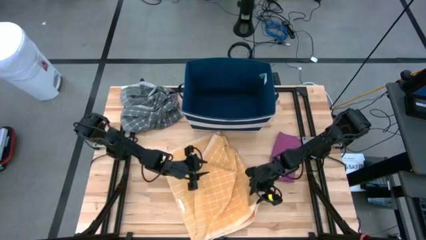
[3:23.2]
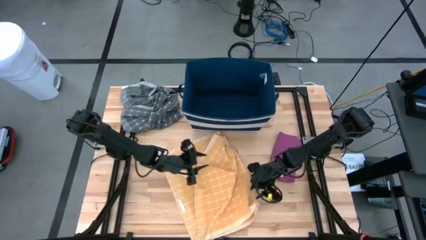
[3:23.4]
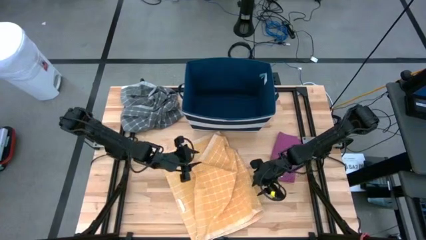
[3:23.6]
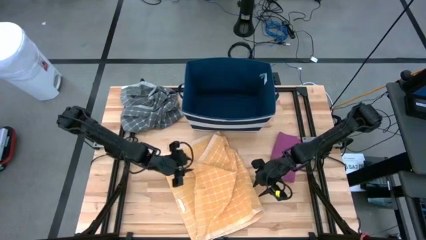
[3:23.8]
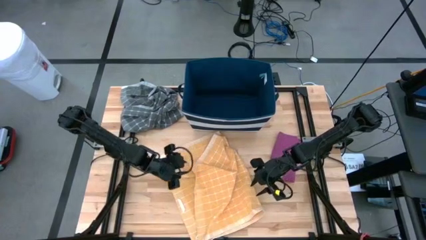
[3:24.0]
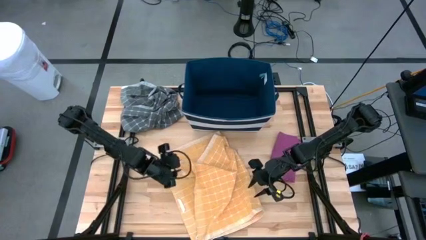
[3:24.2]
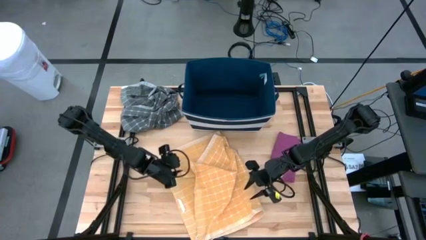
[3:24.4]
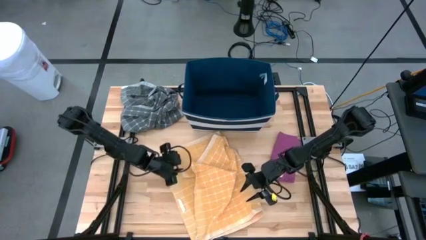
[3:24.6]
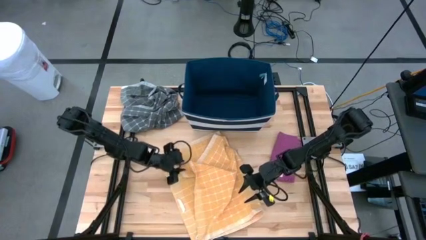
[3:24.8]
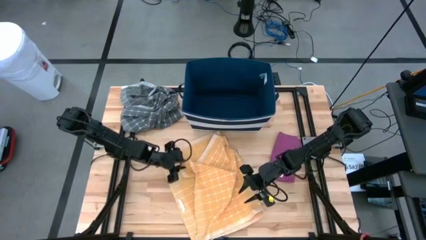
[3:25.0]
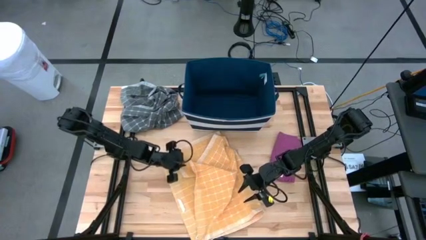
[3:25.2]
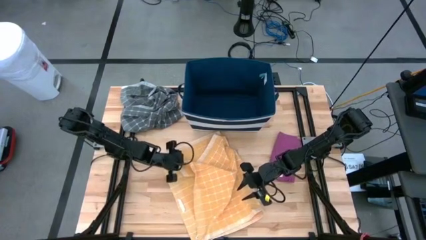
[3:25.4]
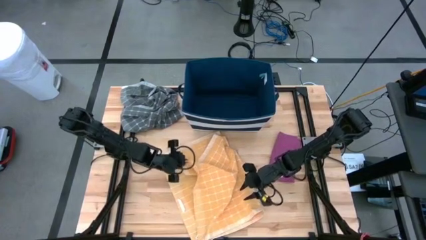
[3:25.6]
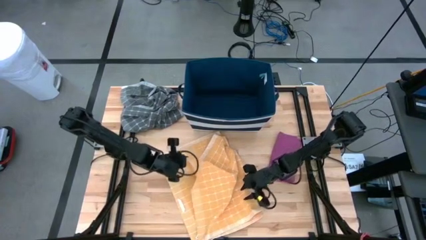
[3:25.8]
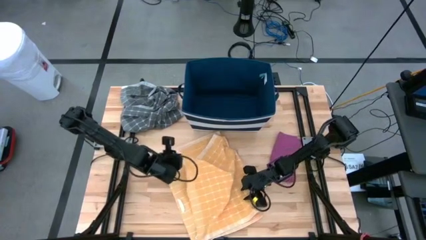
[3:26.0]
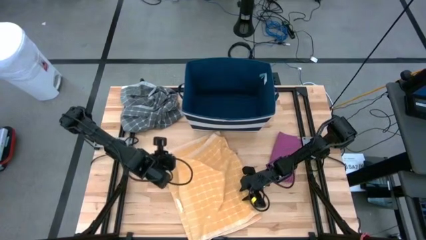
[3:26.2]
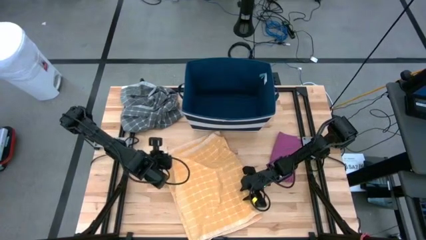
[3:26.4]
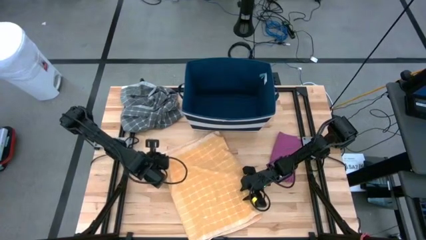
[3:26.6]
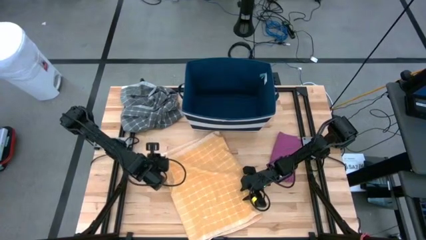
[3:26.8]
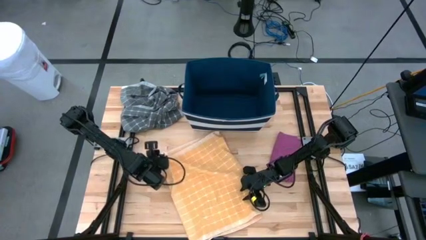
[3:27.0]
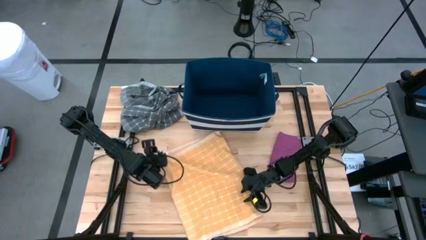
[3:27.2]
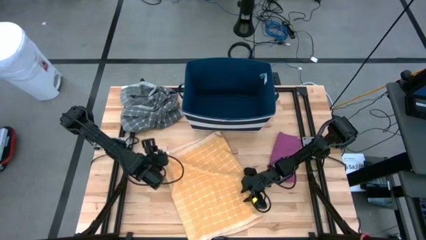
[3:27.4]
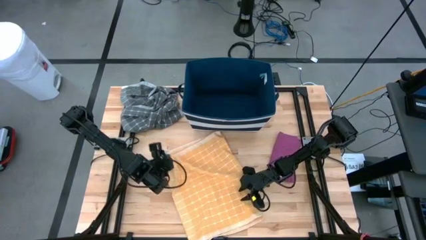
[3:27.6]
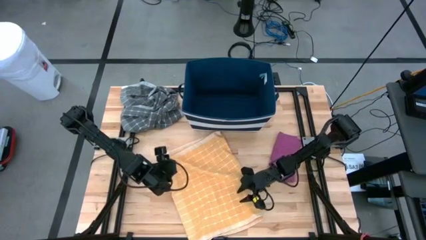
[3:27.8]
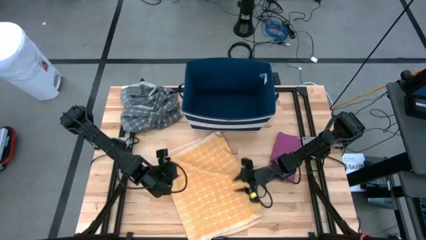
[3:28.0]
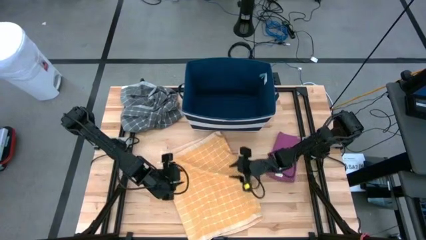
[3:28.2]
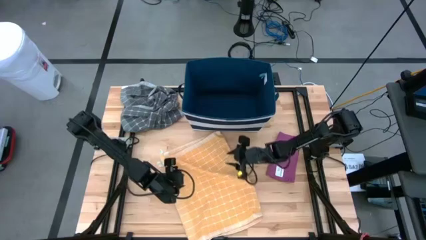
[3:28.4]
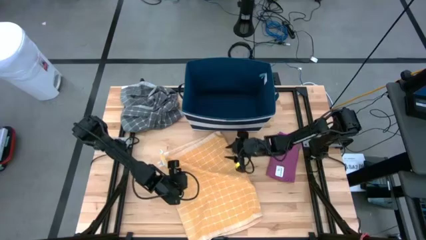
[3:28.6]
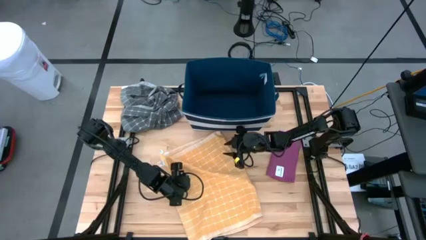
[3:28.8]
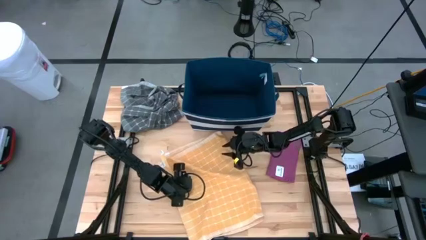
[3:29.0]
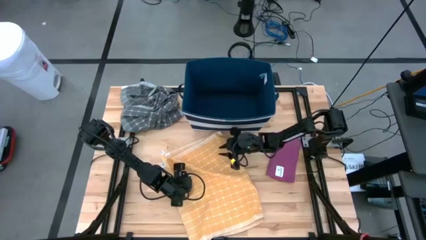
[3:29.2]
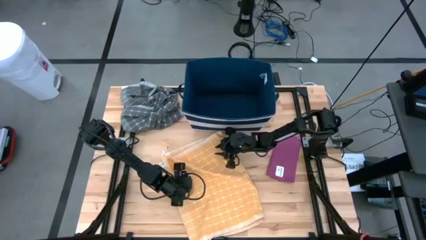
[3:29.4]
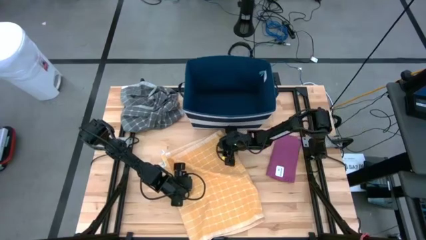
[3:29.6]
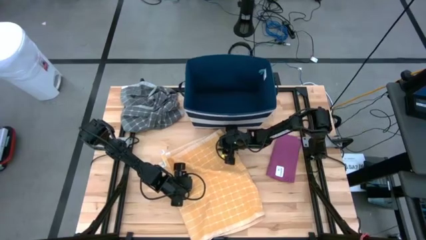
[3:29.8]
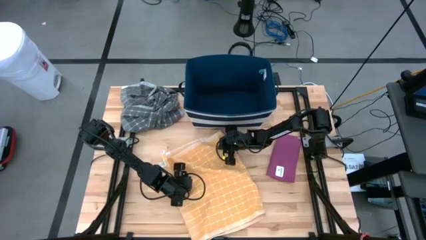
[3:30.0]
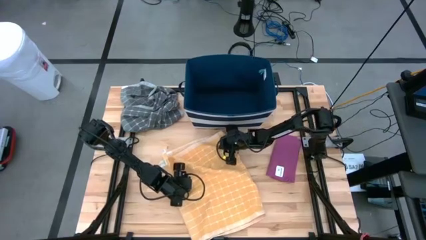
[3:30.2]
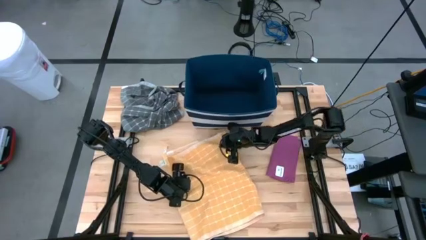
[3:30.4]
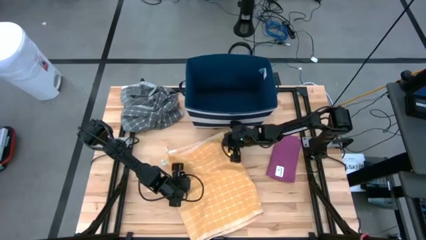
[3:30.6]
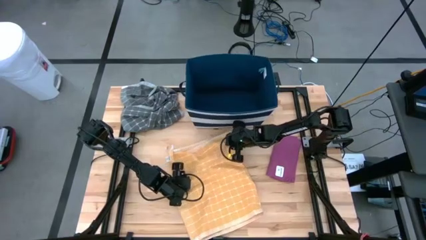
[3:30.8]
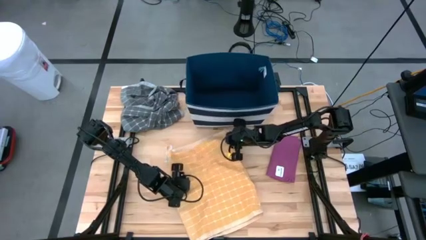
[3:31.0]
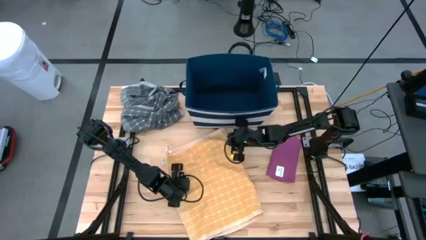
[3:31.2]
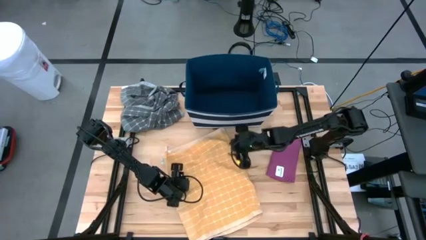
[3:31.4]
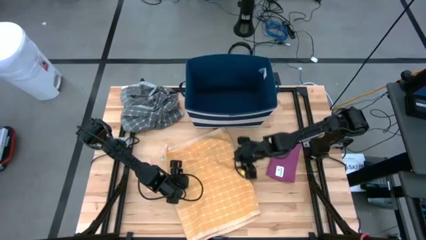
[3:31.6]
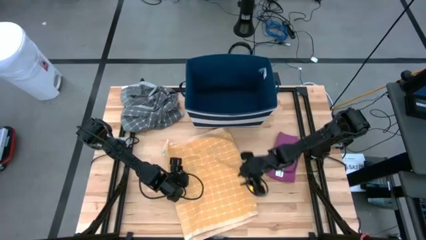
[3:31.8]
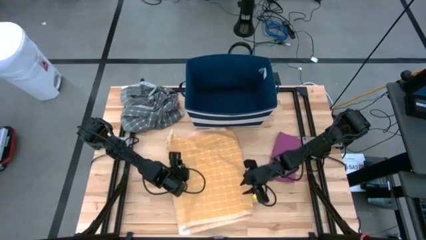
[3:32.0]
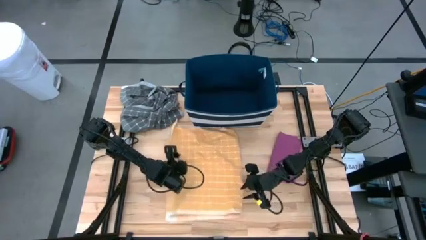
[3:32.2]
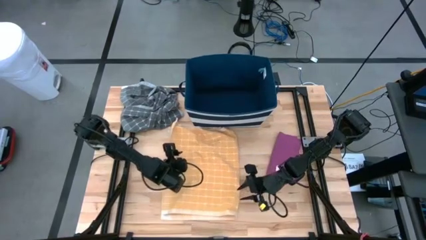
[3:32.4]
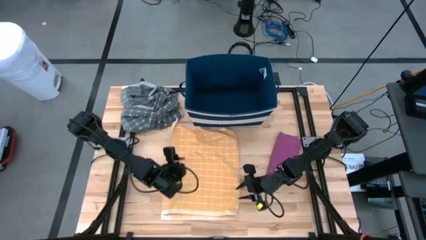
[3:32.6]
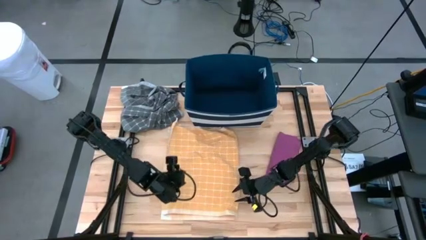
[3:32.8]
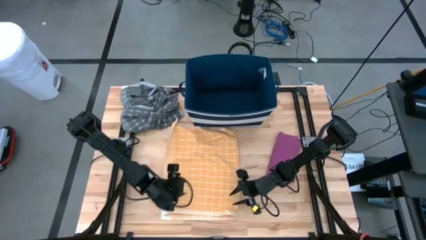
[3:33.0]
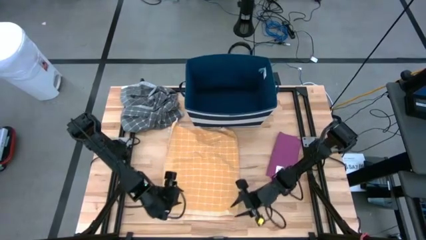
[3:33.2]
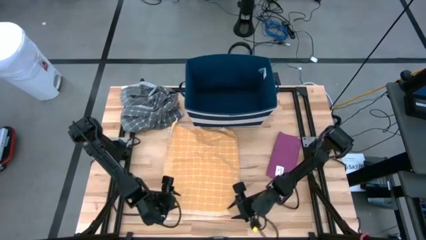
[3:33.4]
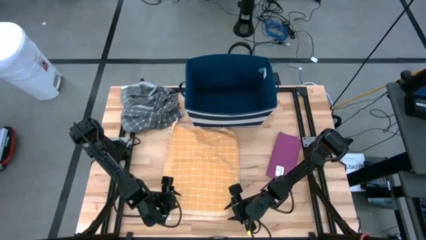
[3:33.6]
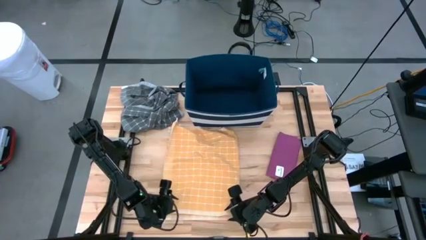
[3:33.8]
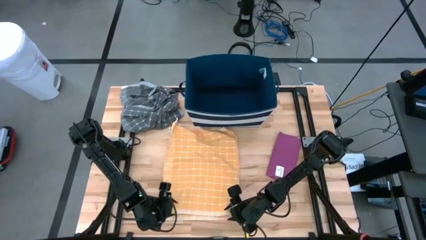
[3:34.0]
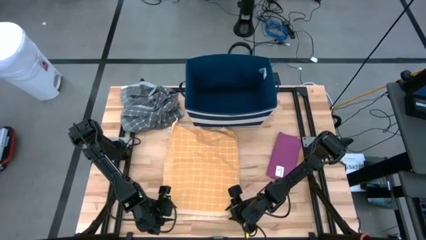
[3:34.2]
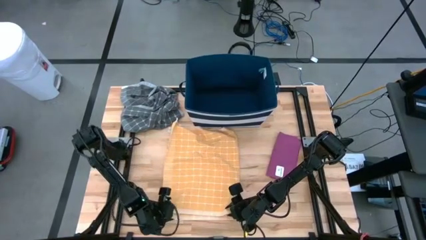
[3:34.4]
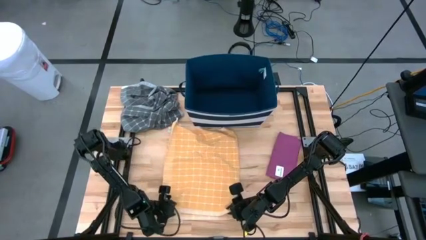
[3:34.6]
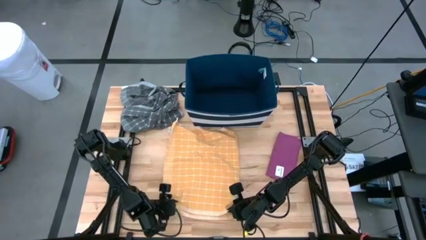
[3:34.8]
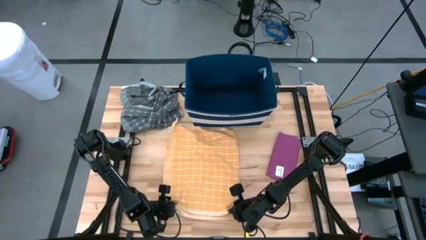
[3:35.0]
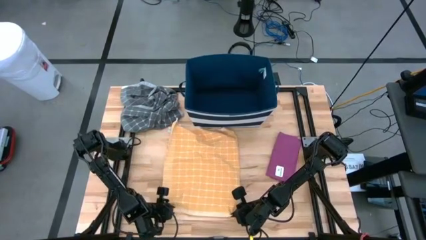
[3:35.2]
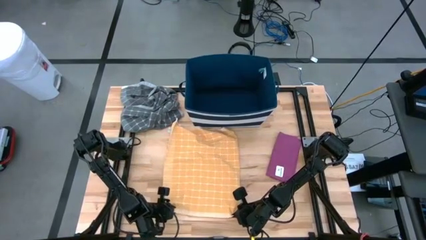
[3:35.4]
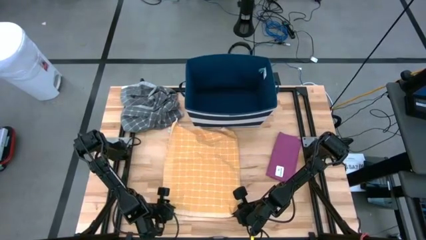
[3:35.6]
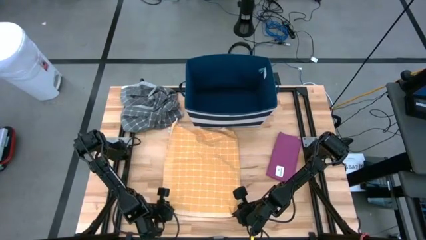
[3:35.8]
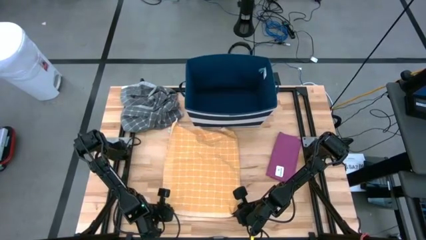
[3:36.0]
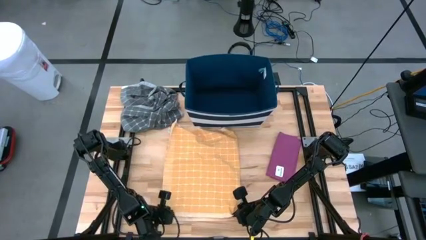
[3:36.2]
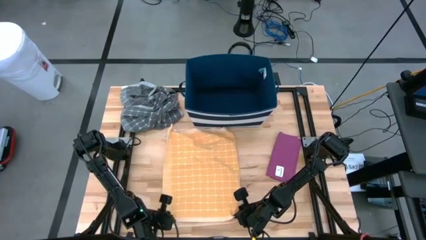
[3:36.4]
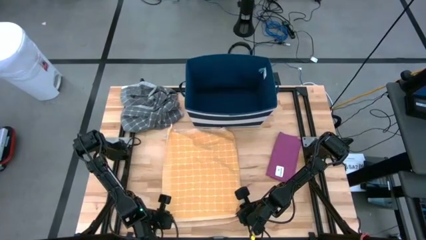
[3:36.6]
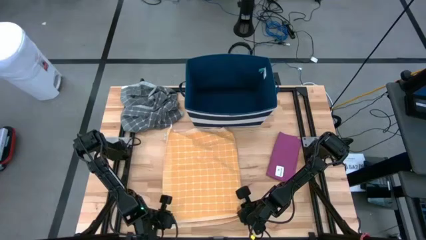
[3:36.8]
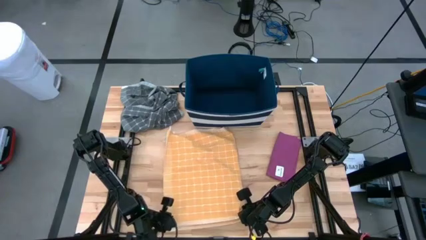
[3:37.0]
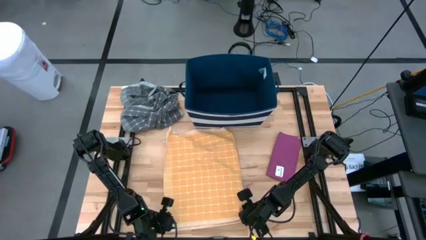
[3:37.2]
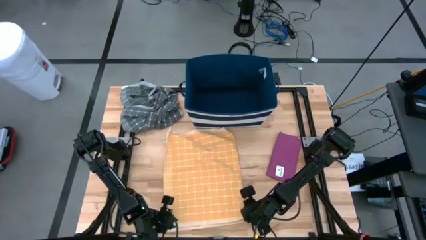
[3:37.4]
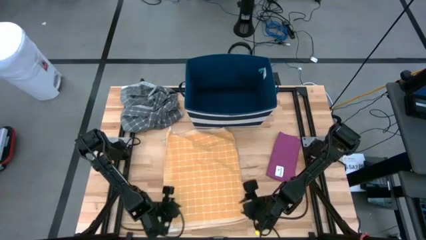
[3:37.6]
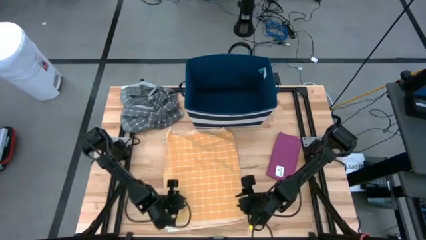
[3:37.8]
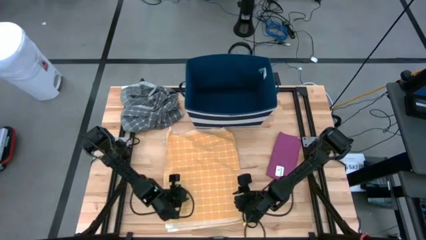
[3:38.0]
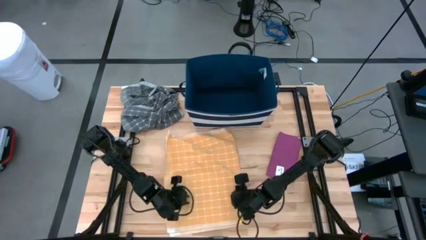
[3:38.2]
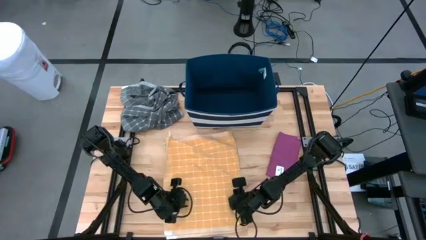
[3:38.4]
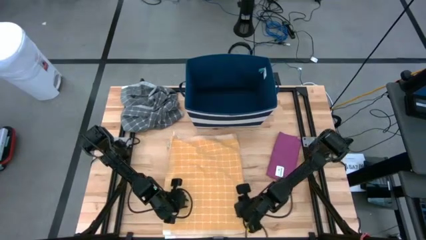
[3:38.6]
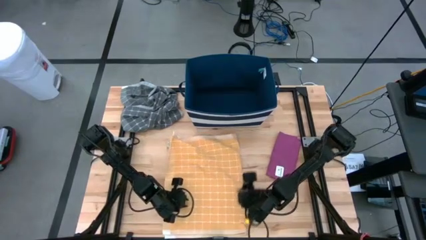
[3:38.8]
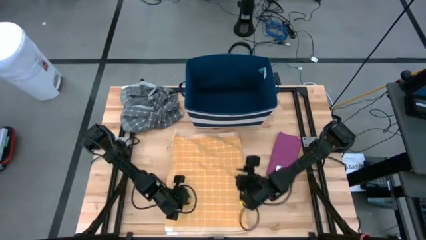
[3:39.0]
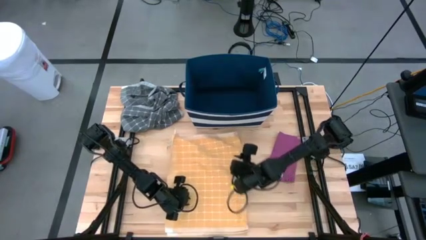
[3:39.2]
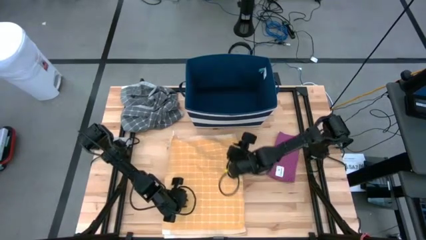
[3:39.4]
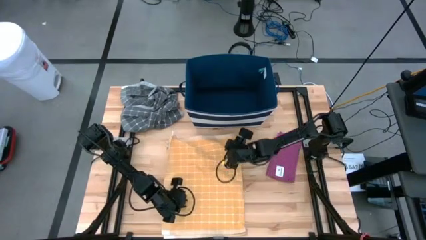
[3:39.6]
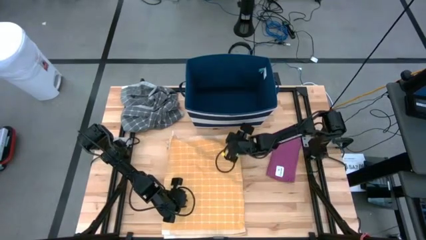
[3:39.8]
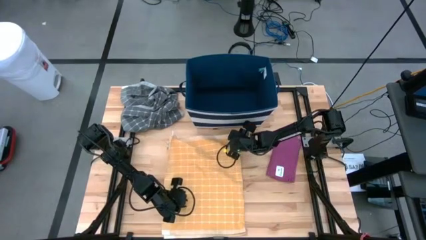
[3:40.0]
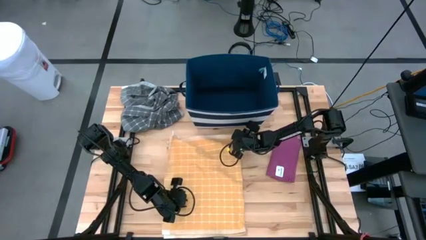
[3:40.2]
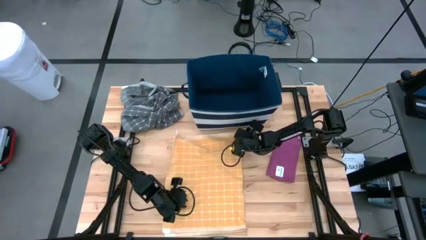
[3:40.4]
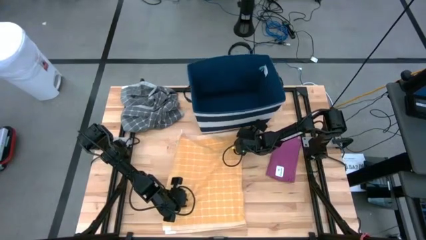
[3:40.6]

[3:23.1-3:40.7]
Task: Fold towel
Fold the yellow towel
